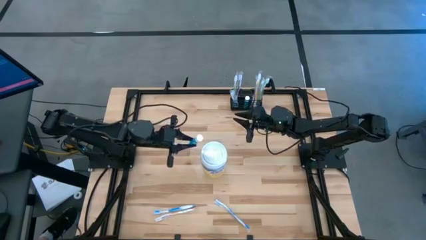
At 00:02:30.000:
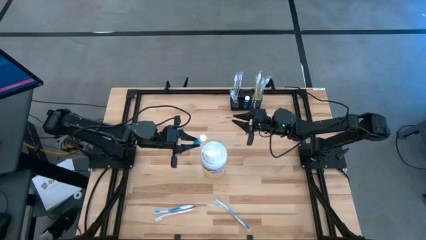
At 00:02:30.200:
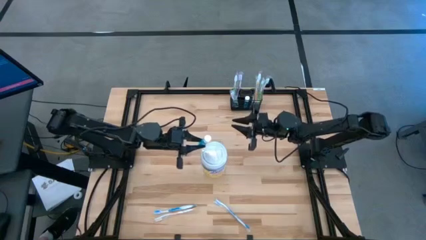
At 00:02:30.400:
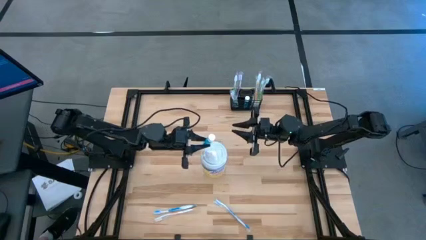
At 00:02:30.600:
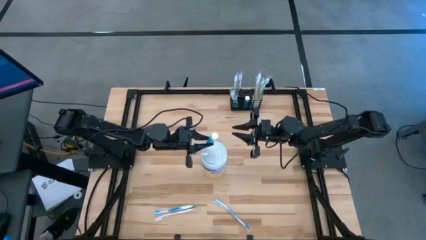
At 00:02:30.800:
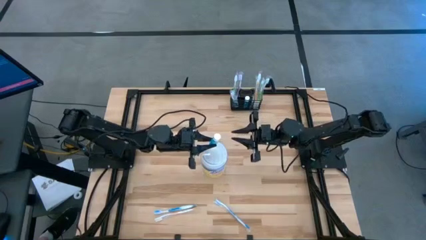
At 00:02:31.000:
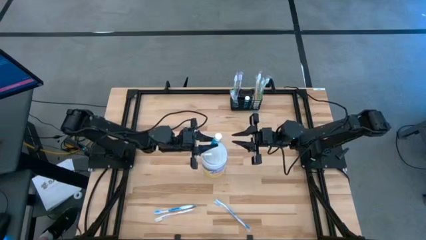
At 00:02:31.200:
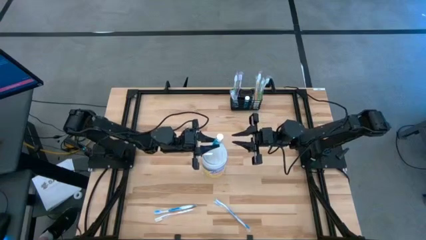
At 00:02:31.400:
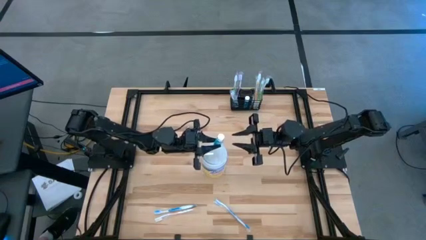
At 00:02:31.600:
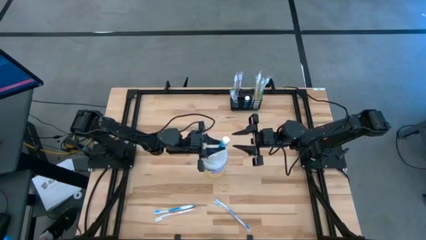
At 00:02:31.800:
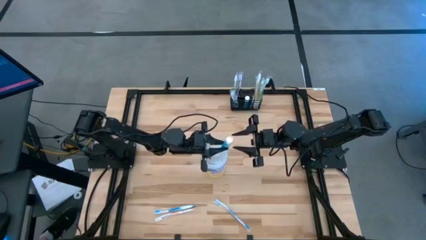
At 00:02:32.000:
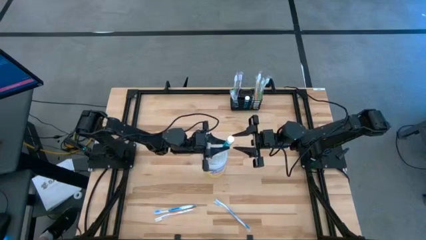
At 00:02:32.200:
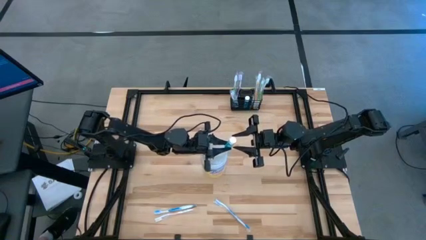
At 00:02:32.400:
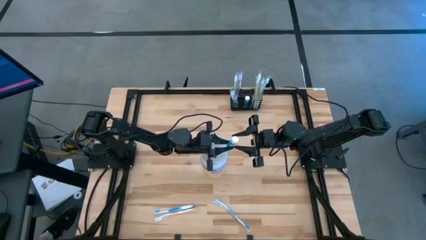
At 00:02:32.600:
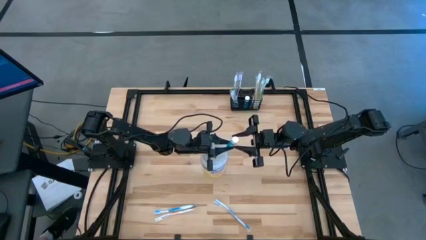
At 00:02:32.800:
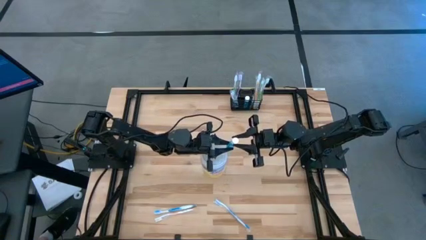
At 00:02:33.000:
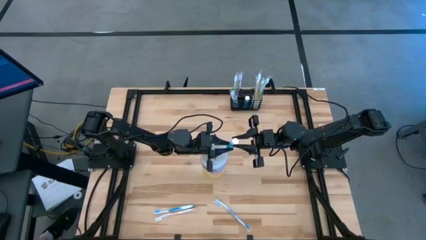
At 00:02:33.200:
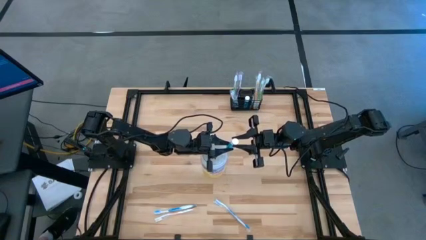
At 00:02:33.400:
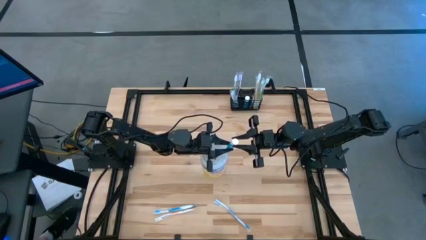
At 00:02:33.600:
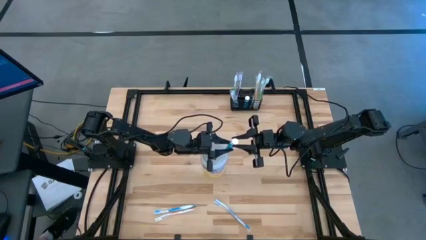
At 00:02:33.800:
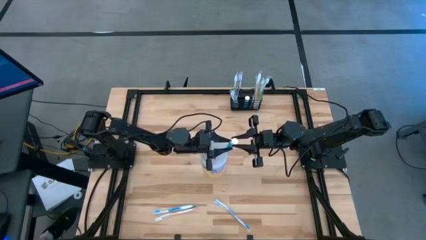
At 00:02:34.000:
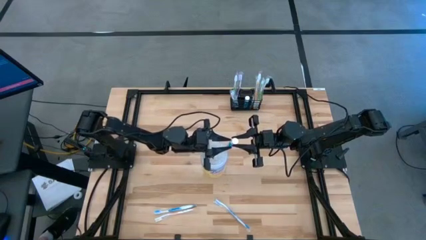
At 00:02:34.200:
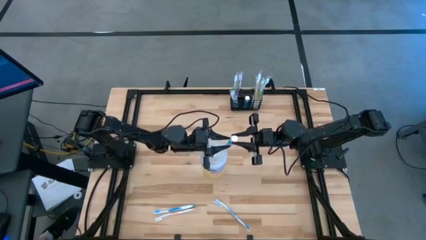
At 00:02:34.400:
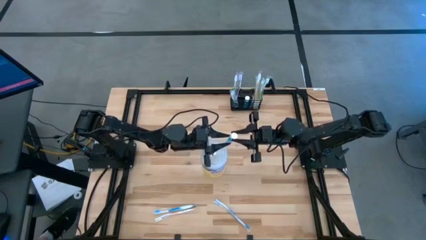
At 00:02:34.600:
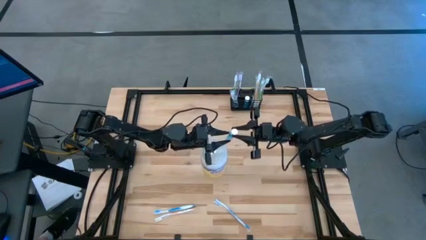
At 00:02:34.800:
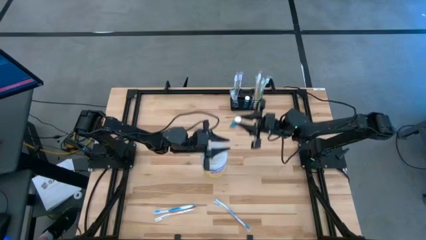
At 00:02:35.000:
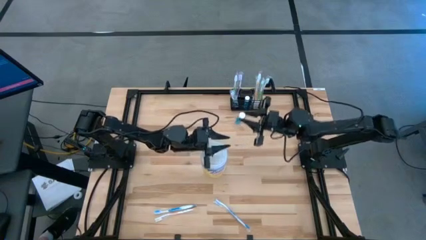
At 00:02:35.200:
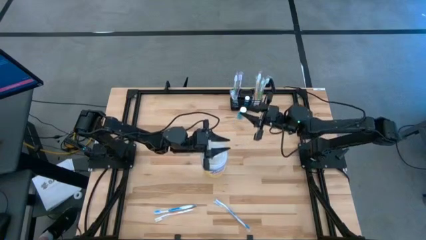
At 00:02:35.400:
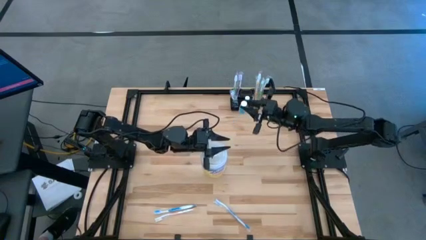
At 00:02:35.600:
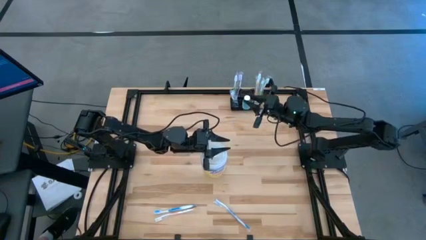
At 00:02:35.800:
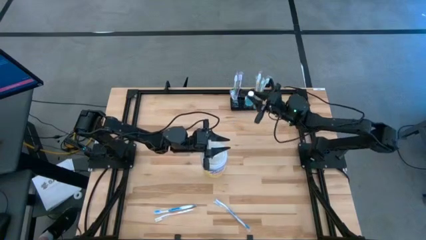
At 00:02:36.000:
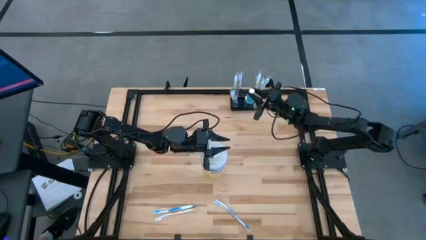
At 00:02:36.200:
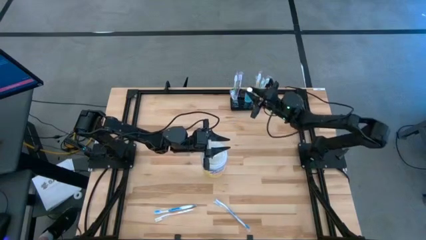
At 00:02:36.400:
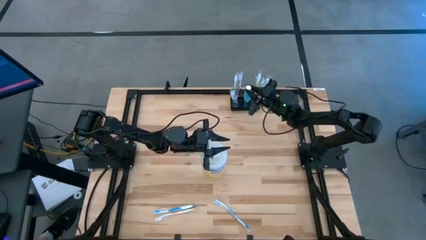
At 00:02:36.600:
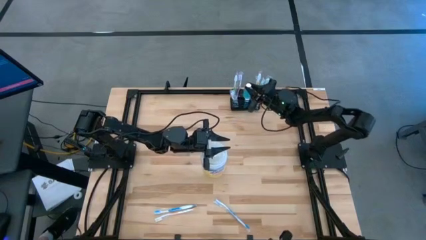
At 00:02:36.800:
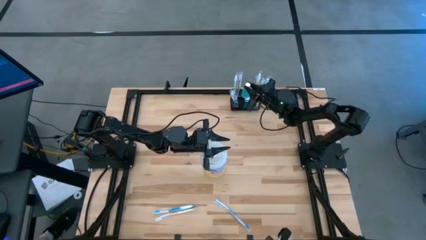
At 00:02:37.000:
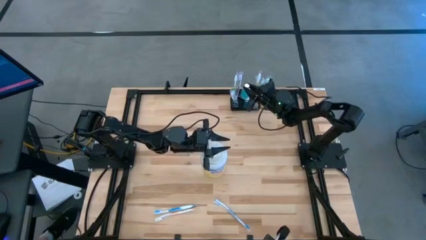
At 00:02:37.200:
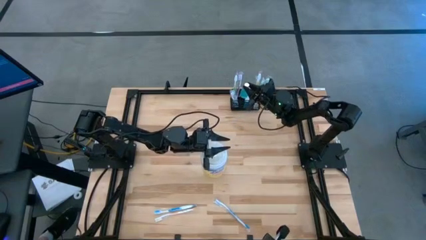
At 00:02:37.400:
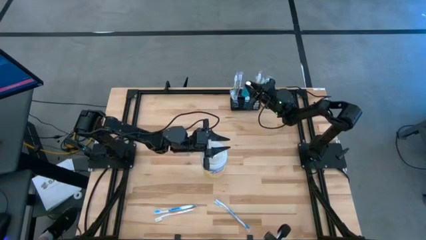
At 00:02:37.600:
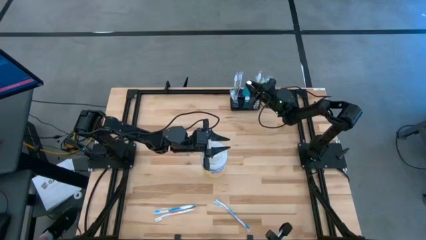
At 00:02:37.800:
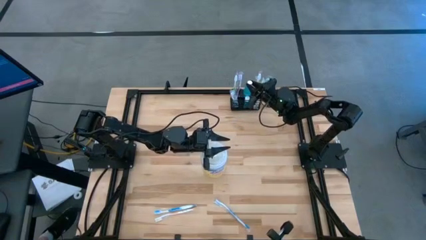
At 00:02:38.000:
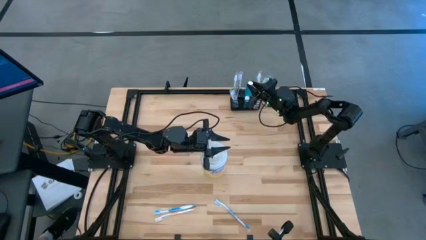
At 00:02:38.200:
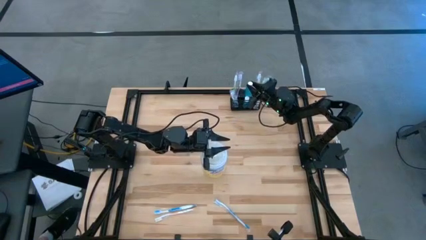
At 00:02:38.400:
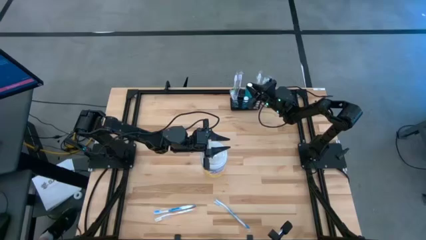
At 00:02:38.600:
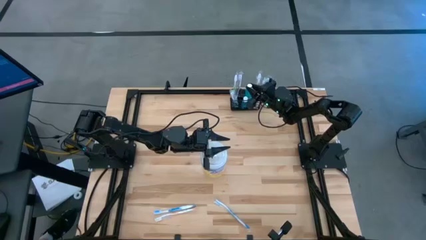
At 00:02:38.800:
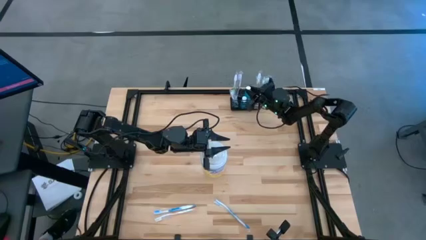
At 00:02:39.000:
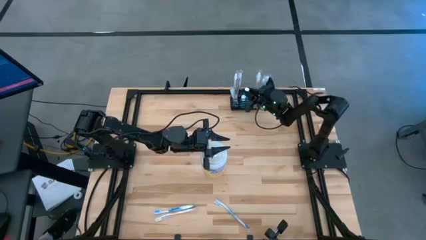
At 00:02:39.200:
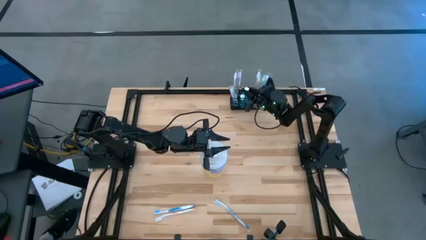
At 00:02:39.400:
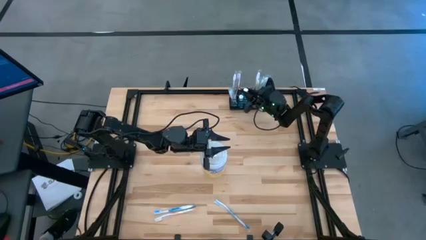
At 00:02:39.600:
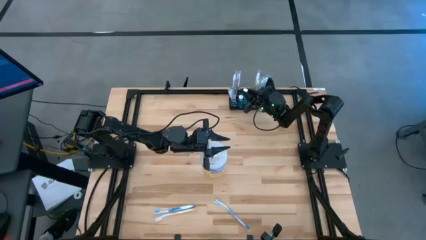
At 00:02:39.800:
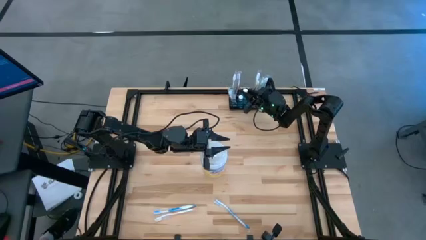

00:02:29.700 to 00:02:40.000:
Task: Pick & Place toothbrushing station
Put the blue mouthwash into the black mesh organizer
